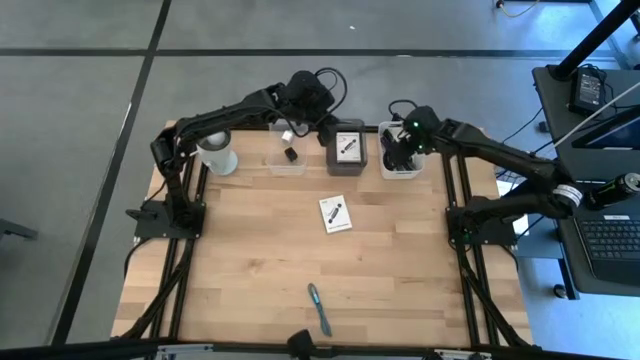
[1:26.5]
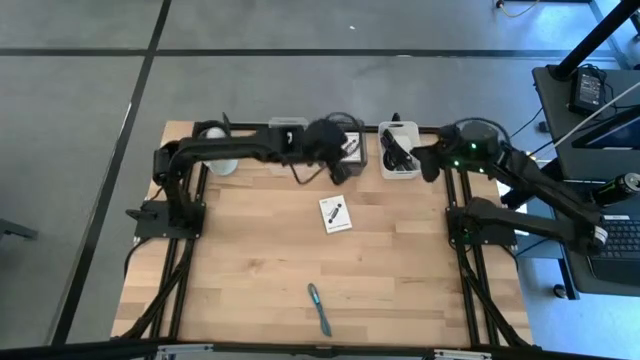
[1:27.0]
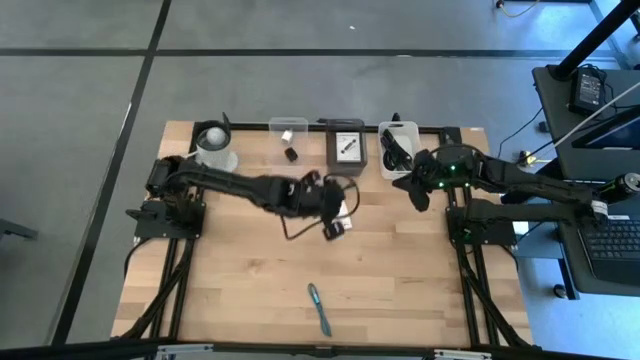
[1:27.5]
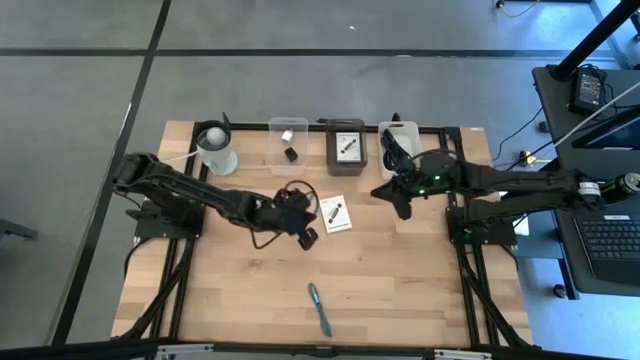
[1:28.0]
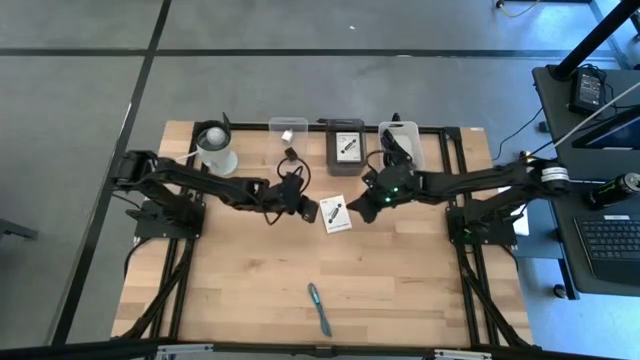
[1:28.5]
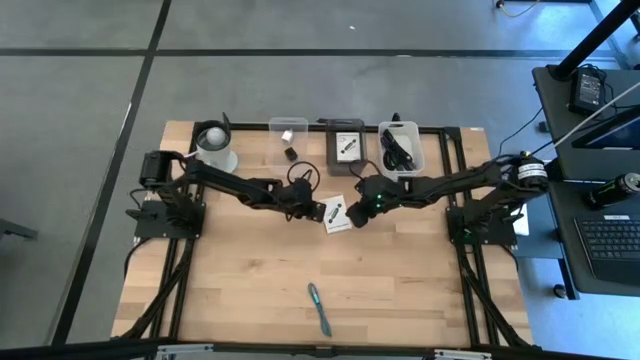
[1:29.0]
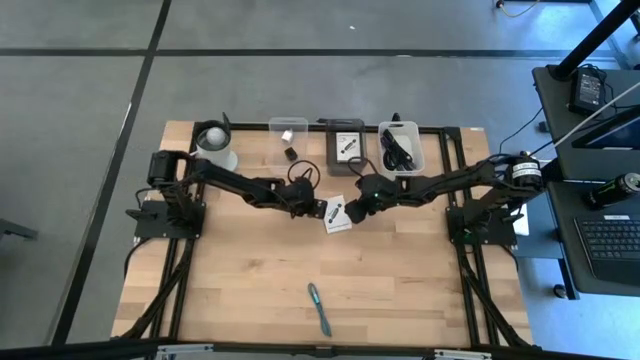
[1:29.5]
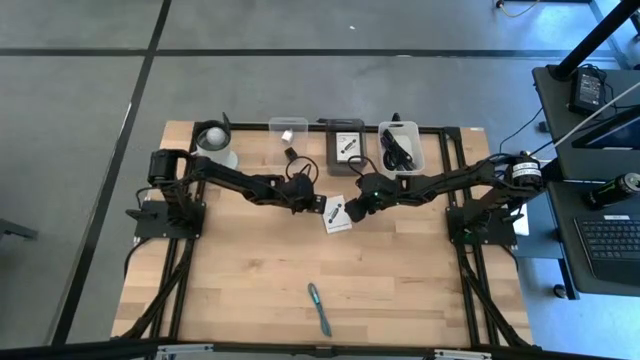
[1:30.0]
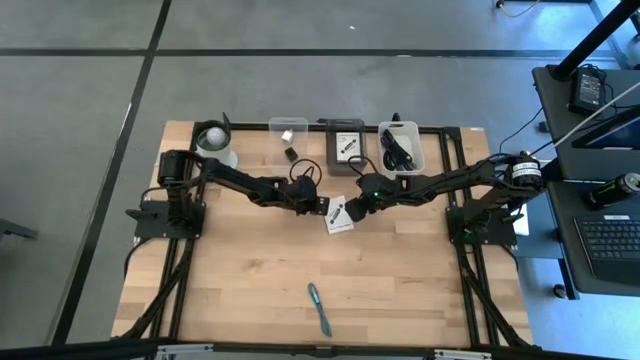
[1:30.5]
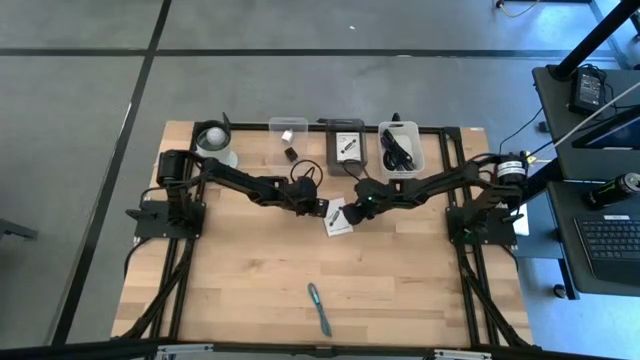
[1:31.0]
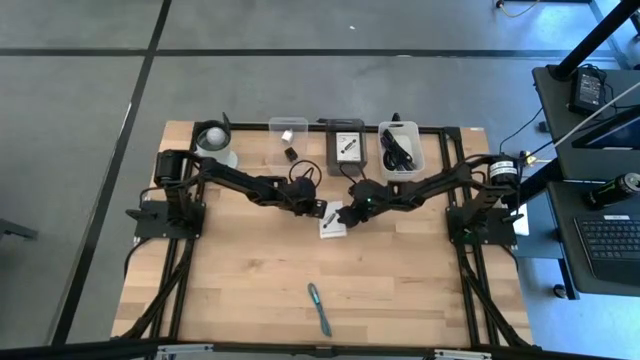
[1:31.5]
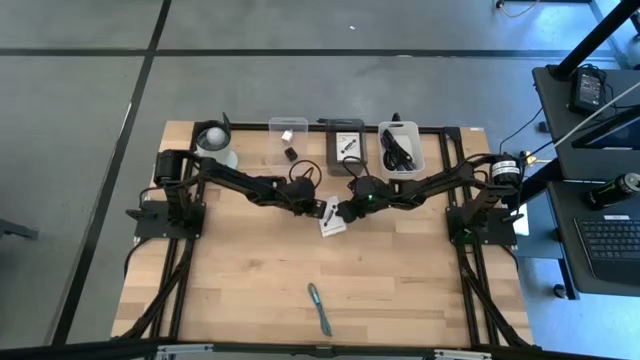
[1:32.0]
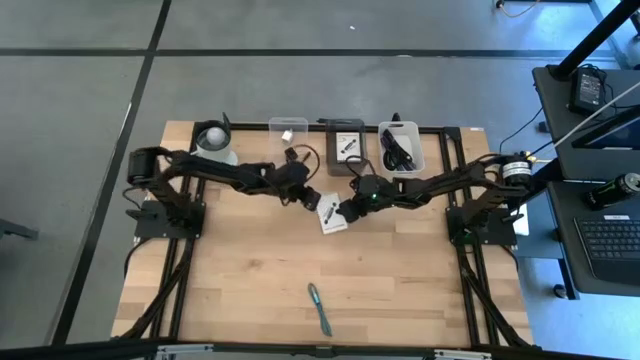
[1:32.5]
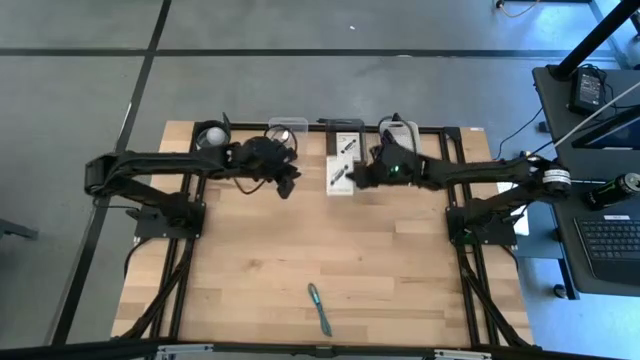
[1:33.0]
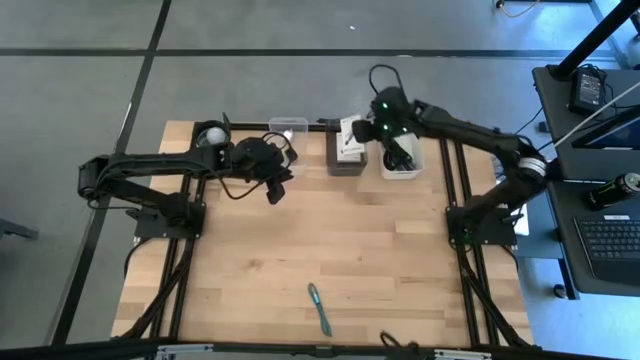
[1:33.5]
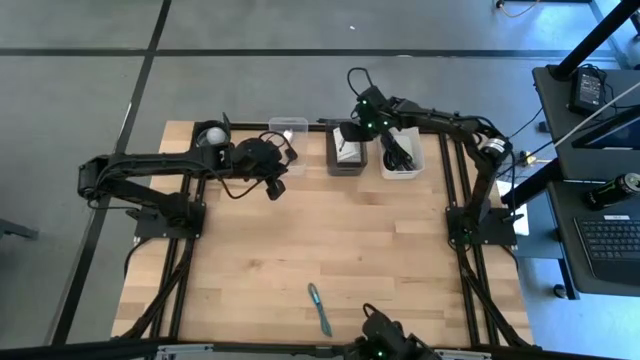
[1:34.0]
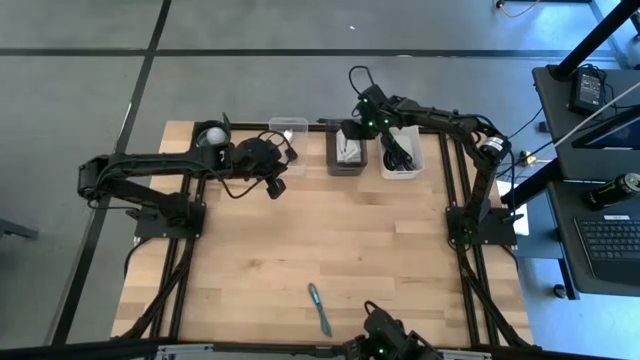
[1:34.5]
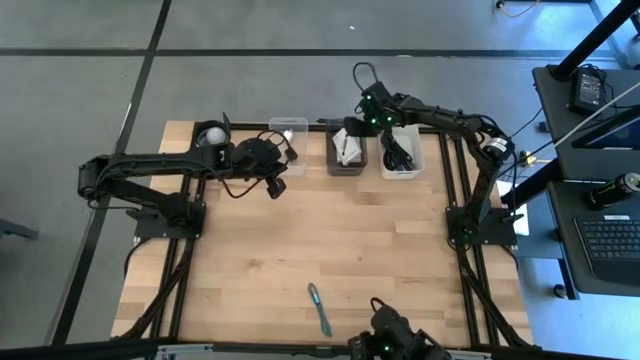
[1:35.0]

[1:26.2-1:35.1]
Task: Pick and place items into bin
Put the white card reader box into the black bin

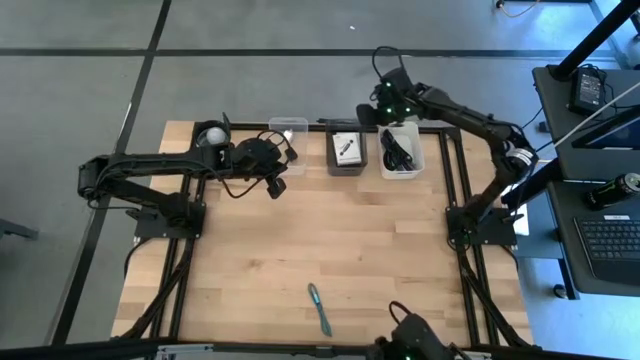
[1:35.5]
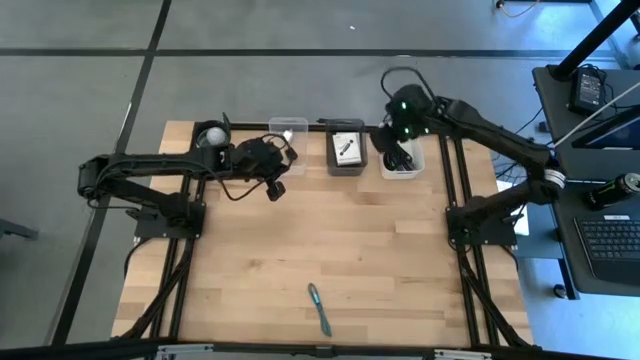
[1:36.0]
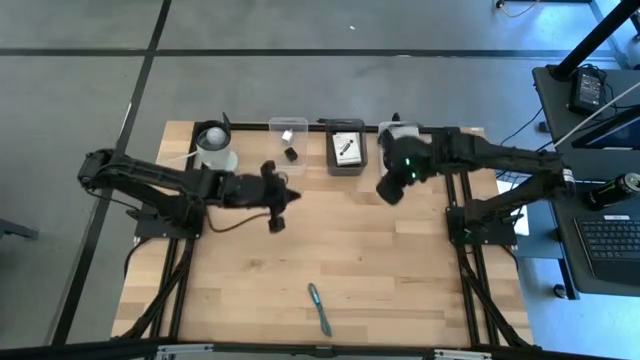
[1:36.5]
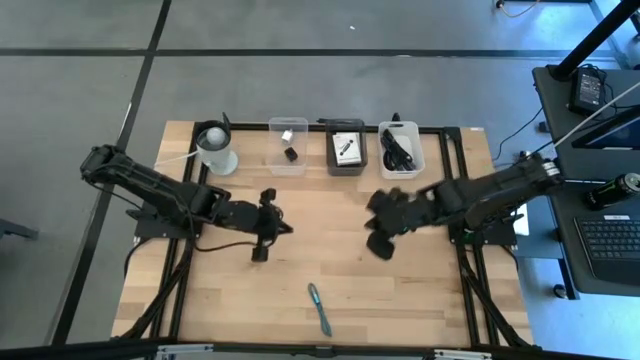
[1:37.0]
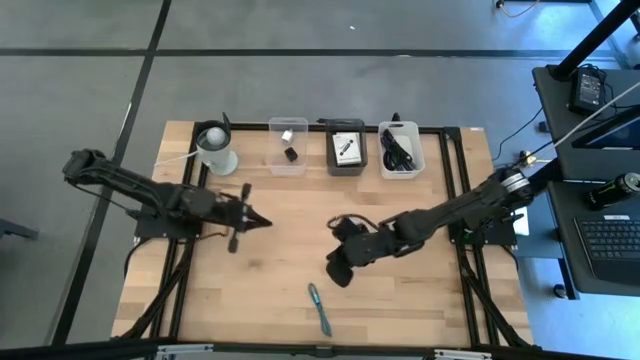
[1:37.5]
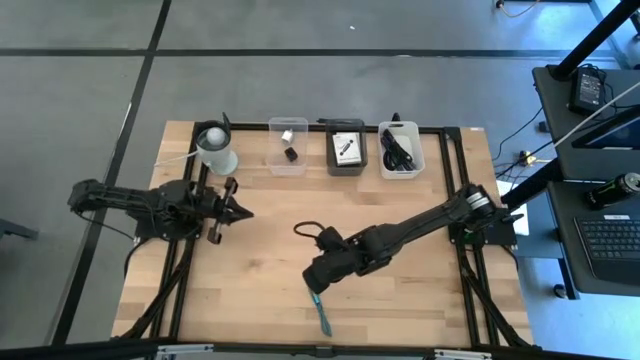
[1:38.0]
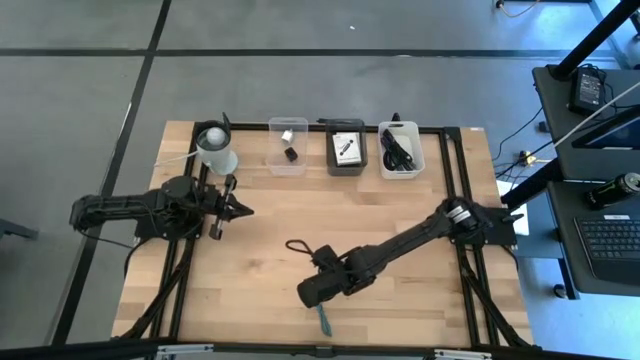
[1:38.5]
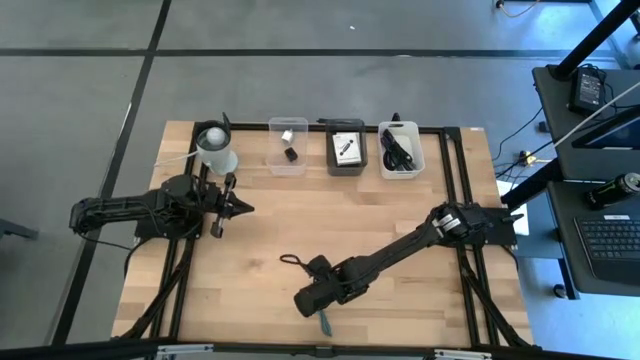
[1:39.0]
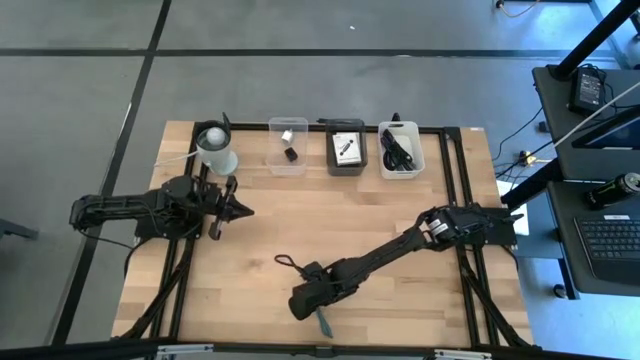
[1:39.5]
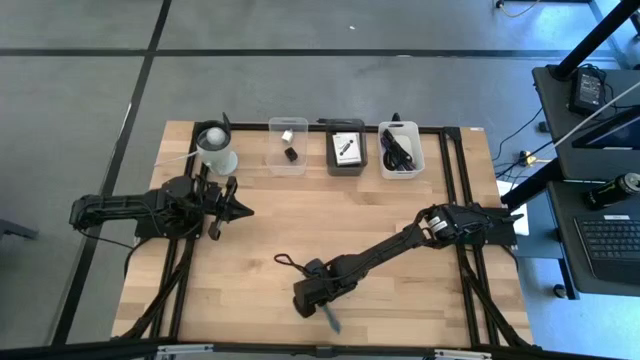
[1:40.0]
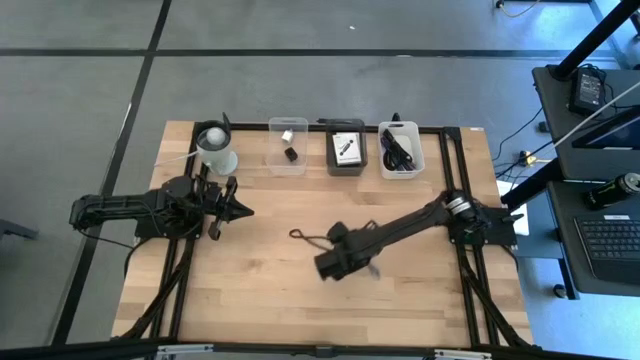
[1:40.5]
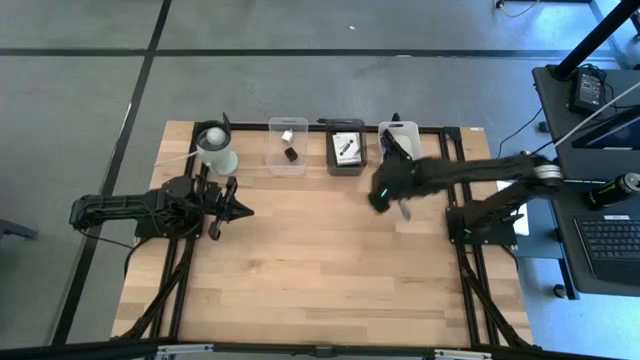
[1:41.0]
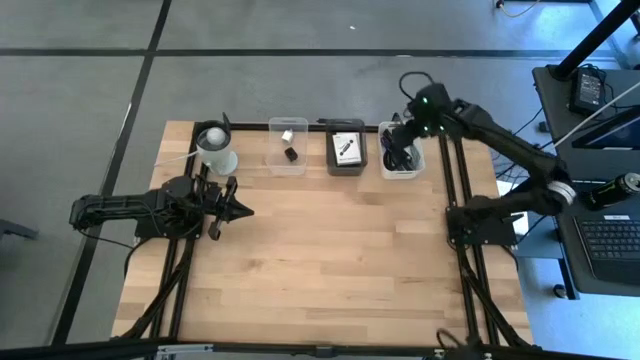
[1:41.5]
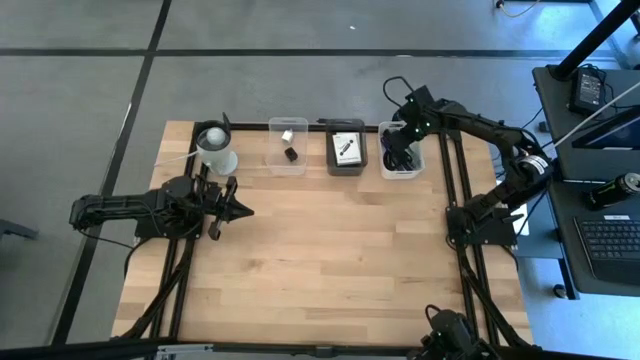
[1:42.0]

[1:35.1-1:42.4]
Put the light blue charger cable into the white bin

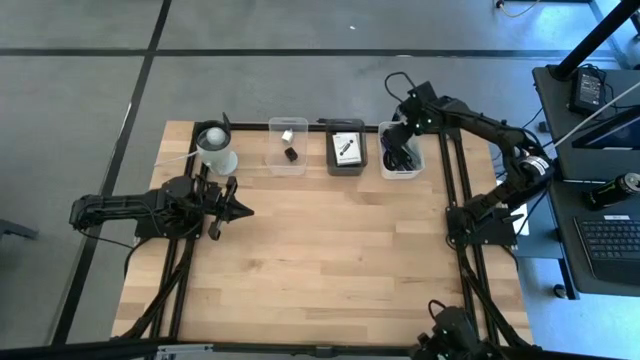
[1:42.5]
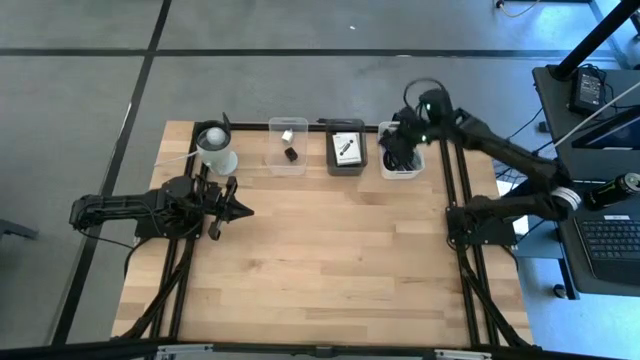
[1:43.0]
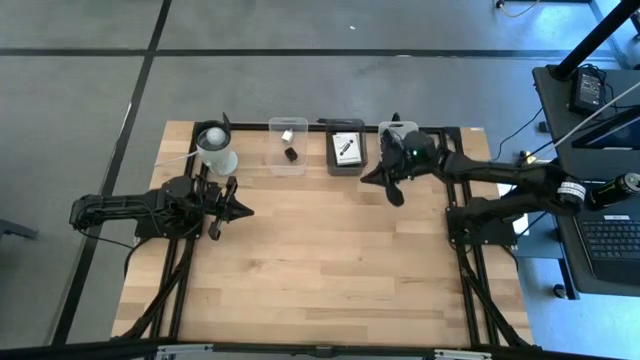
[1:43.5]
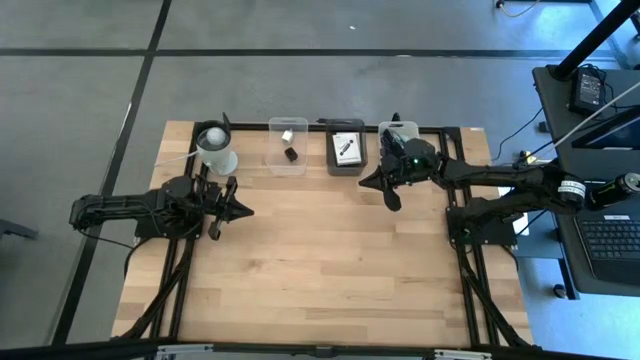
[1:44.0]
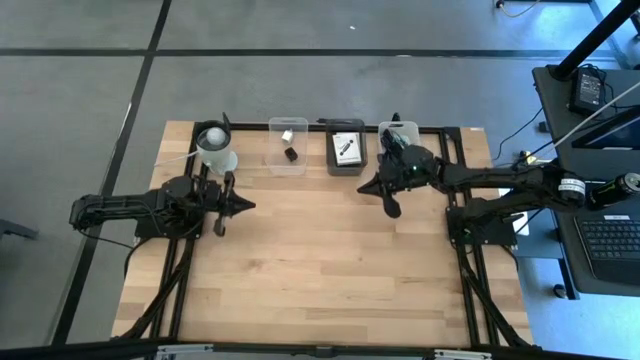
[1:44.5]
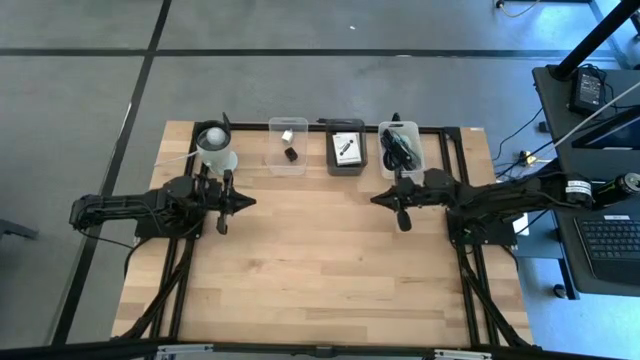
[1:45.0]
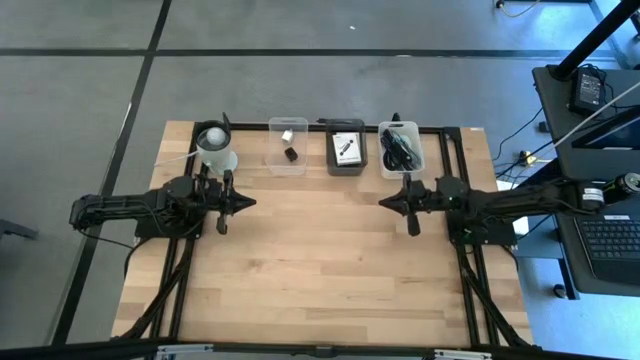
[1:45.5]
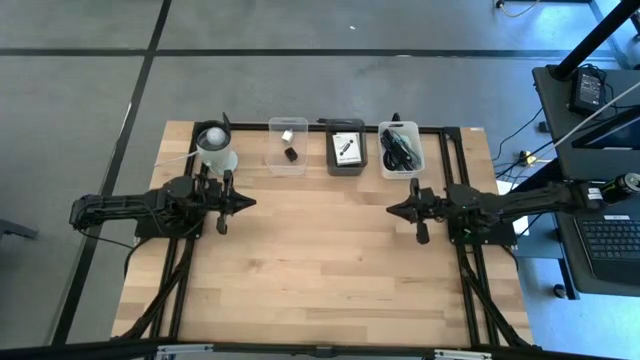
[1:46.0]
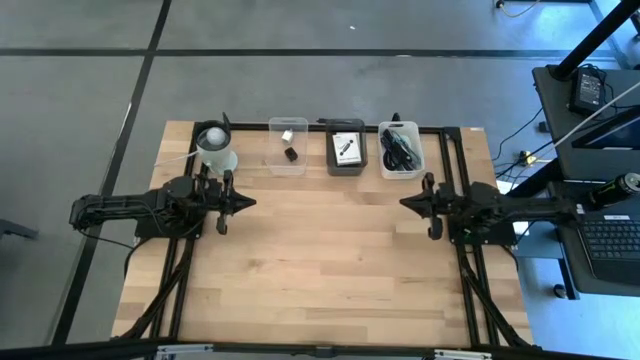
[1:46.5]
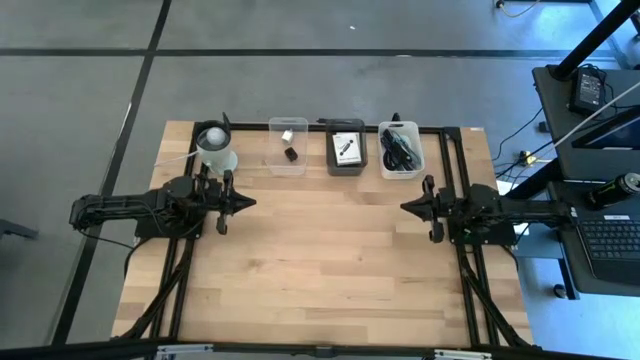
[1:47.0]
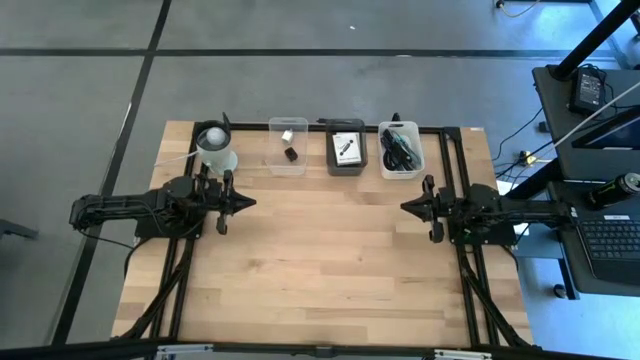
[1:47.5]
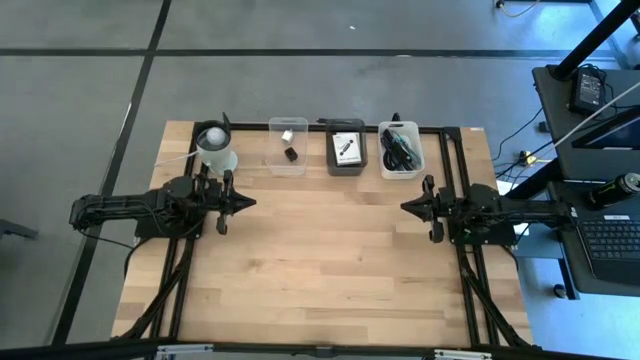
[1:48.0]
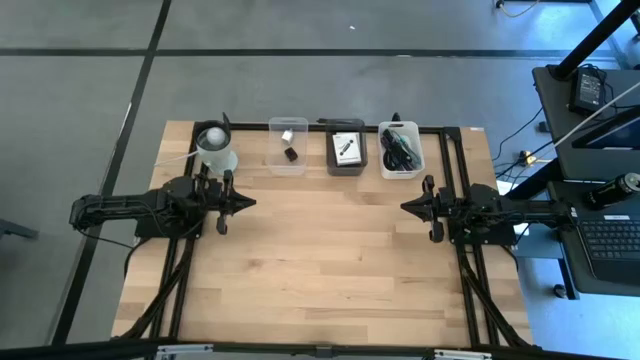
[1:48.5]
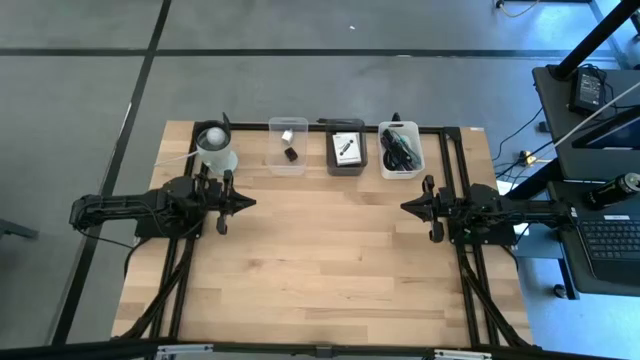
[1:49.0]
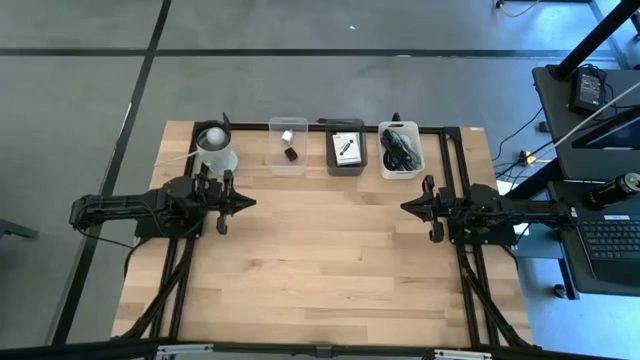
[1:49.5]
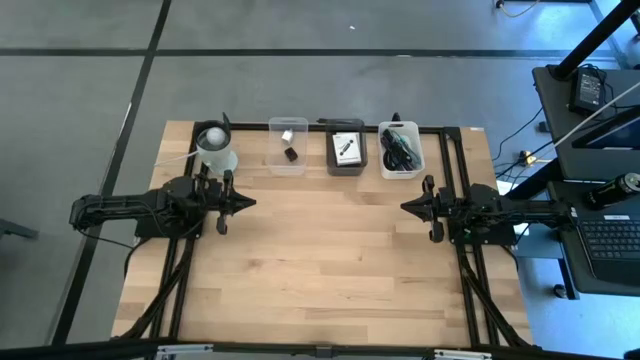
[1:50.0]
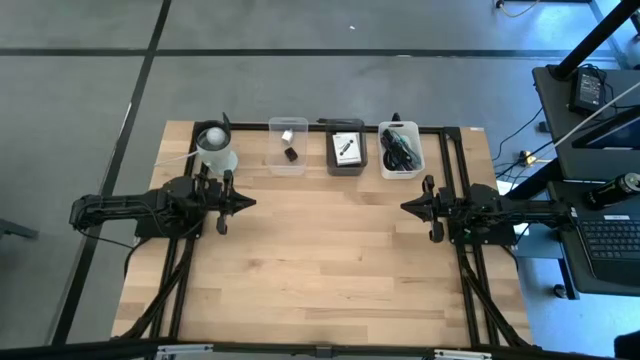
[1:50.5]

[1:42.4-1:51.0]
Return to Home Position
